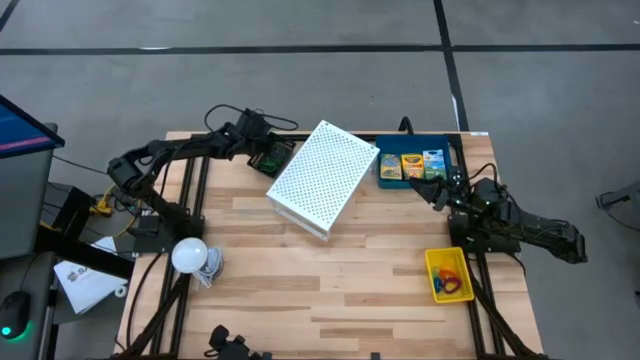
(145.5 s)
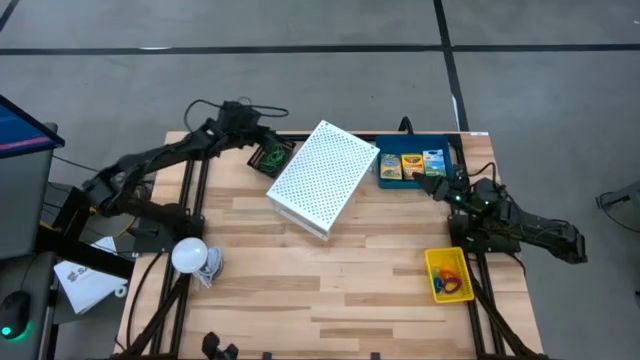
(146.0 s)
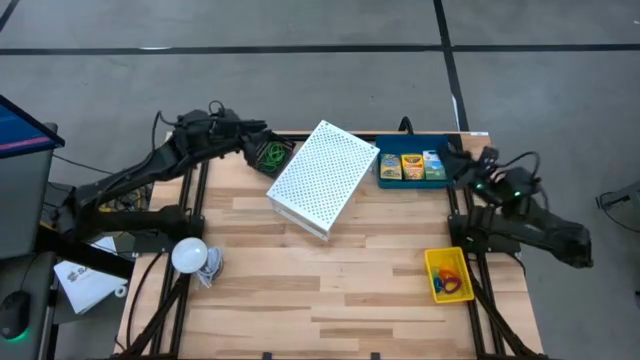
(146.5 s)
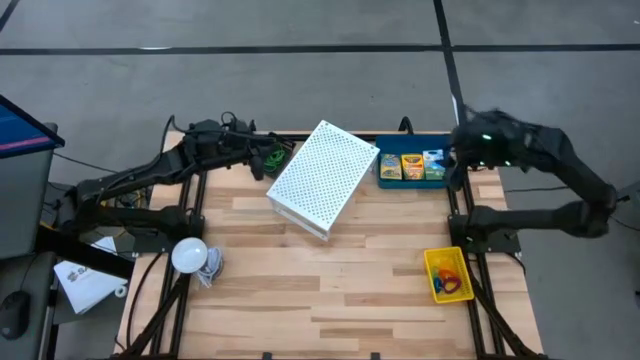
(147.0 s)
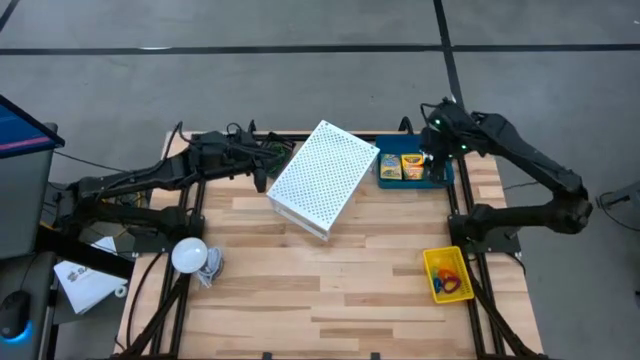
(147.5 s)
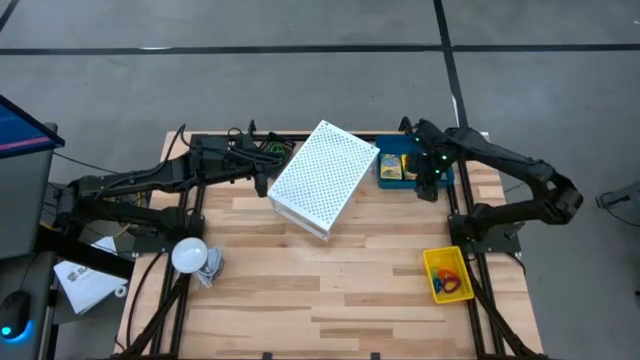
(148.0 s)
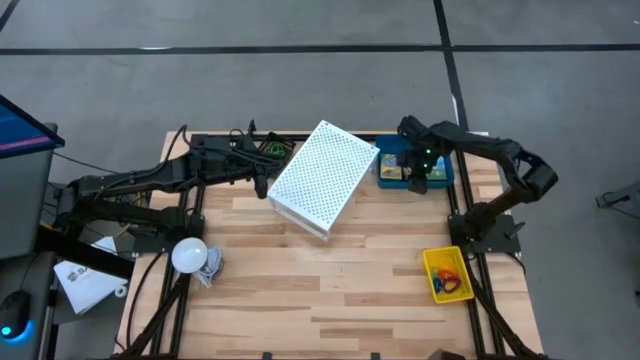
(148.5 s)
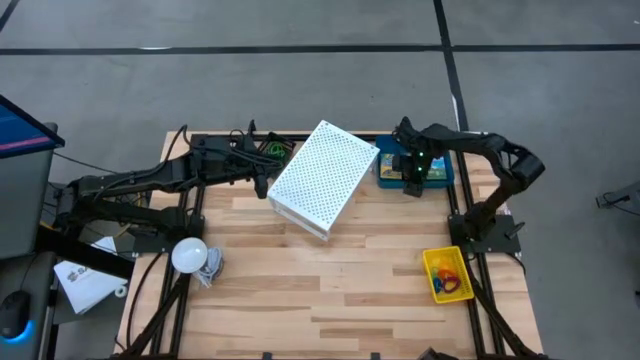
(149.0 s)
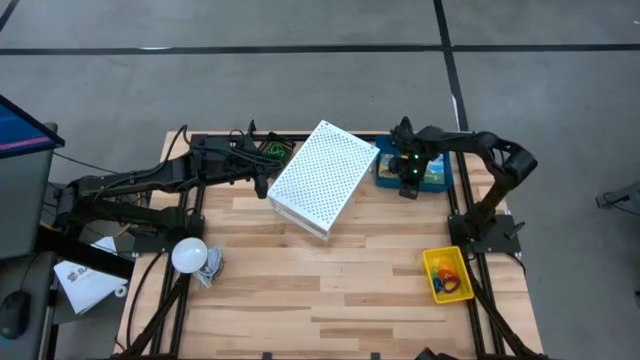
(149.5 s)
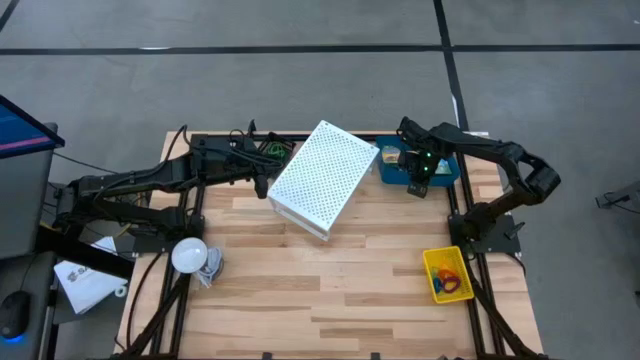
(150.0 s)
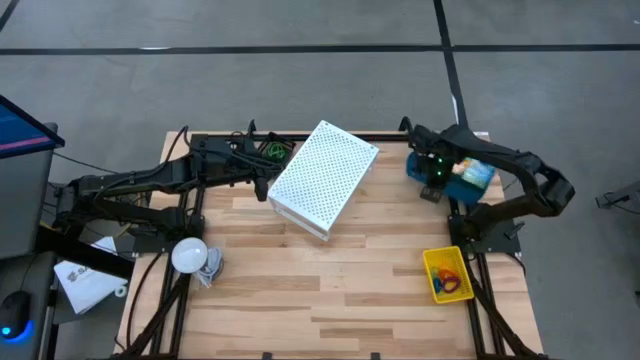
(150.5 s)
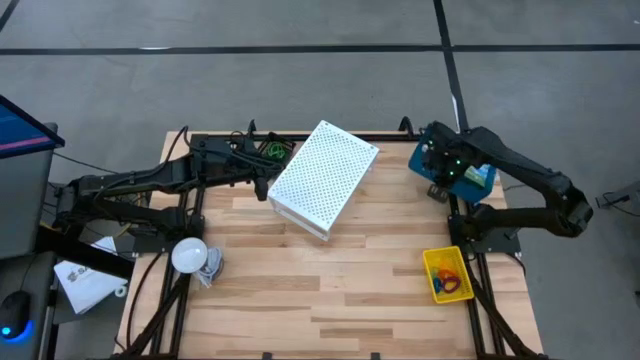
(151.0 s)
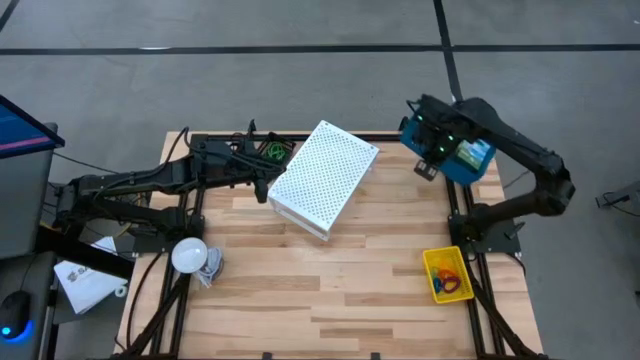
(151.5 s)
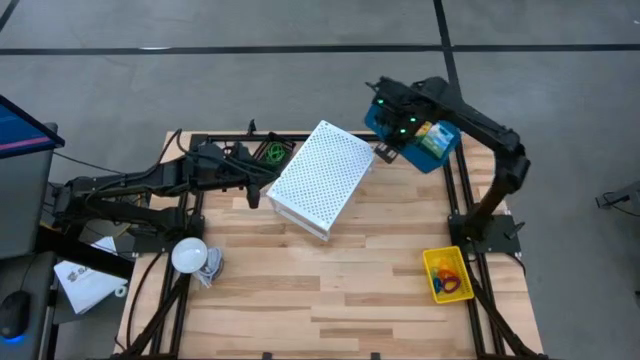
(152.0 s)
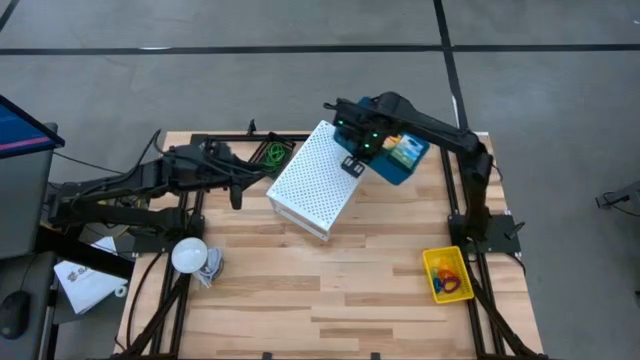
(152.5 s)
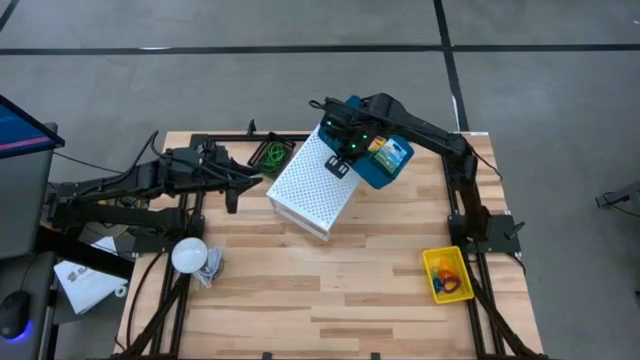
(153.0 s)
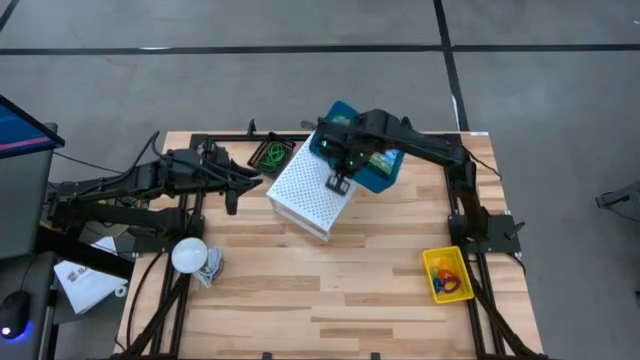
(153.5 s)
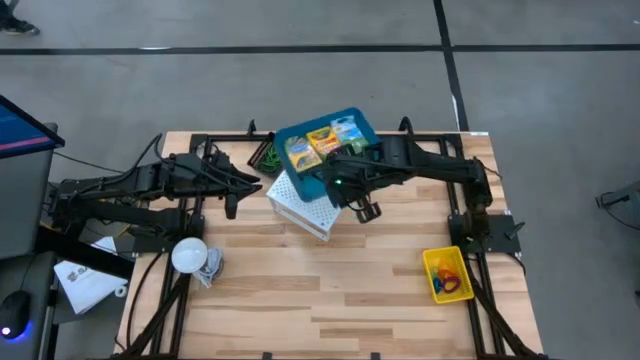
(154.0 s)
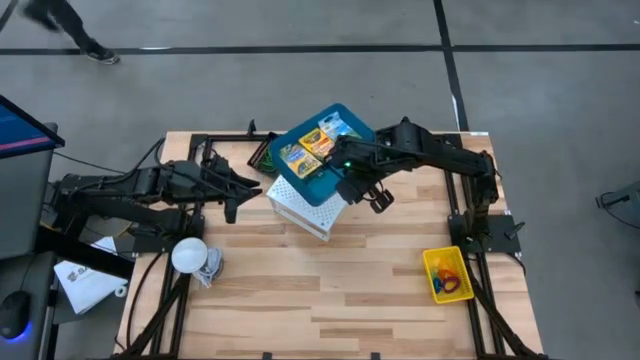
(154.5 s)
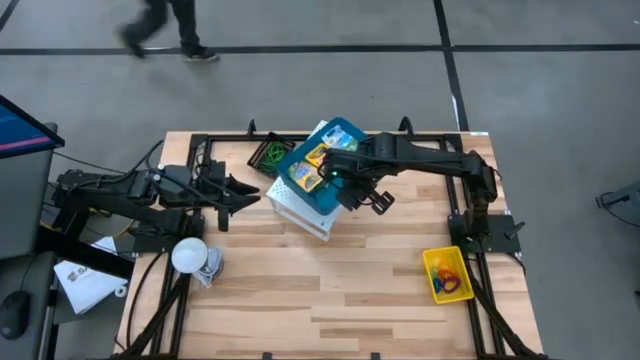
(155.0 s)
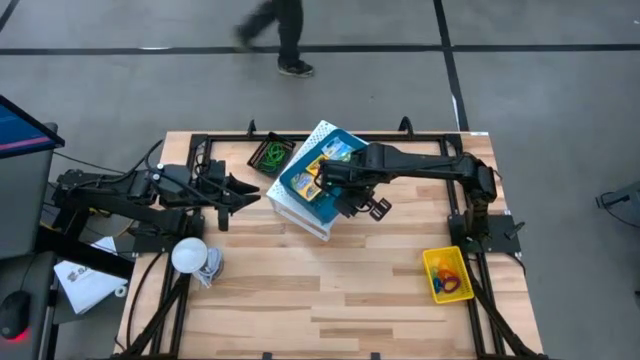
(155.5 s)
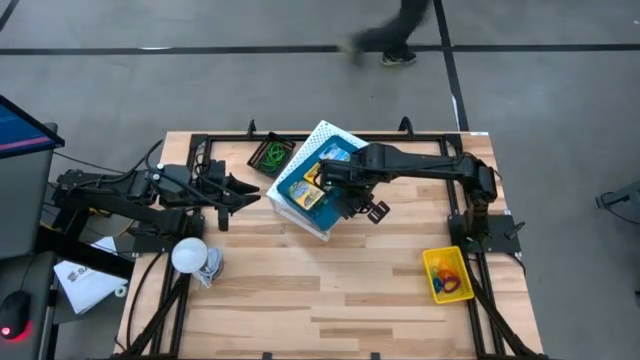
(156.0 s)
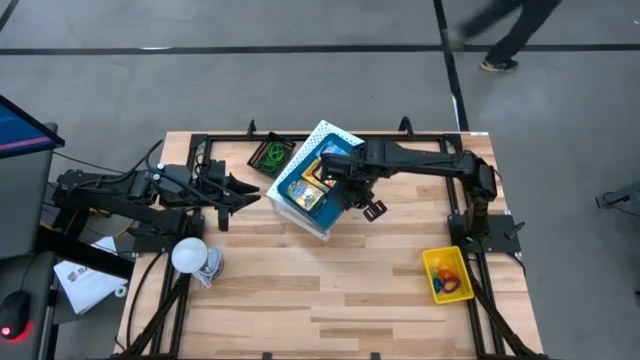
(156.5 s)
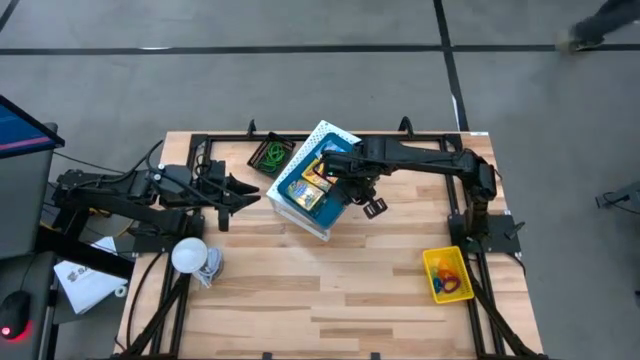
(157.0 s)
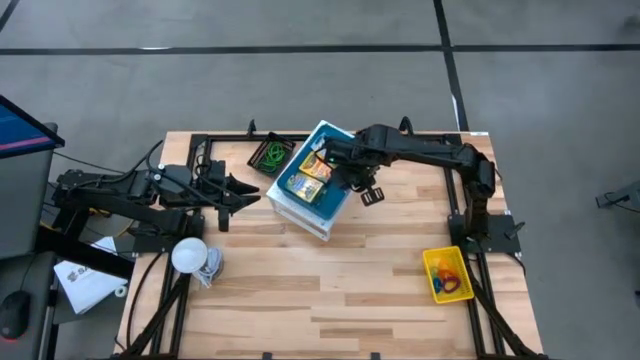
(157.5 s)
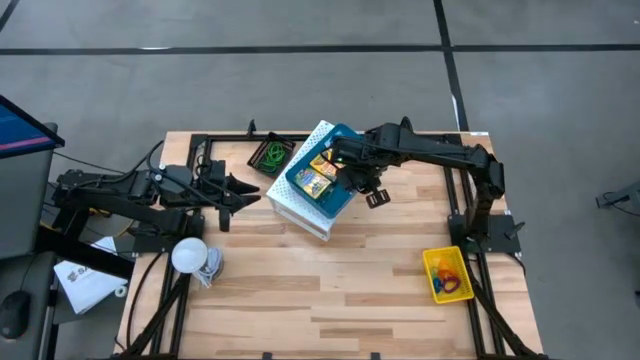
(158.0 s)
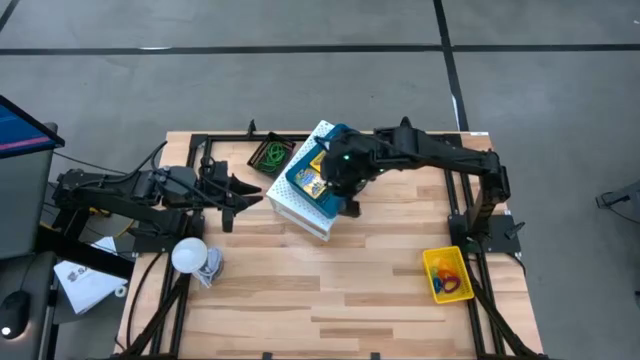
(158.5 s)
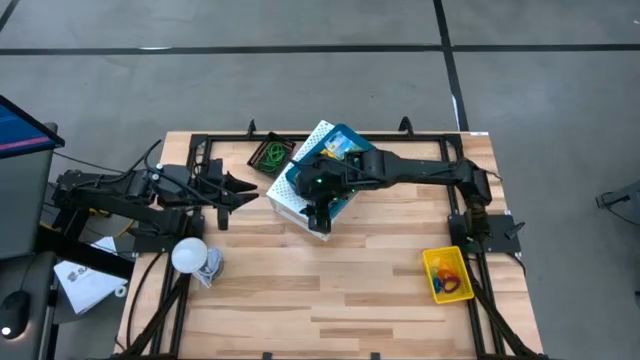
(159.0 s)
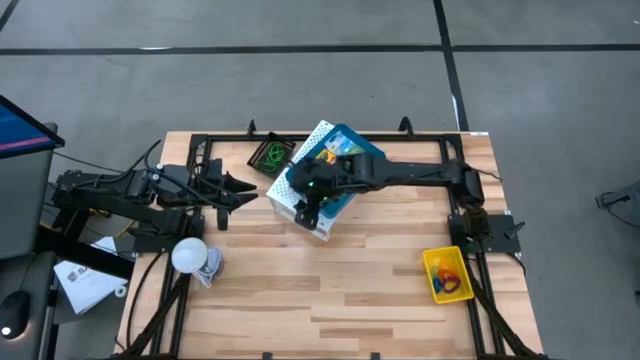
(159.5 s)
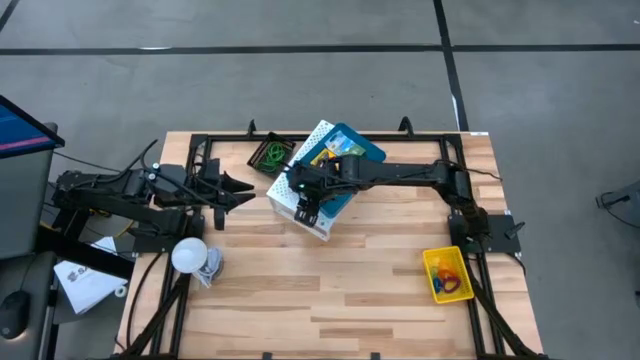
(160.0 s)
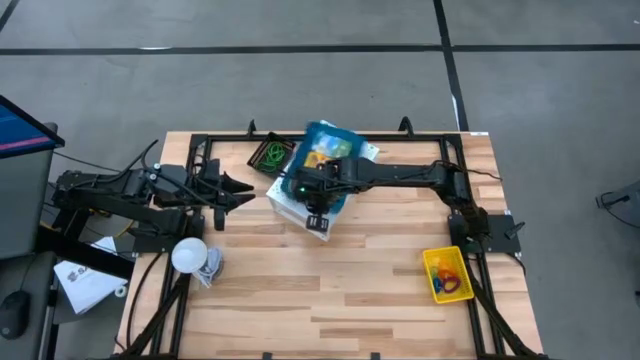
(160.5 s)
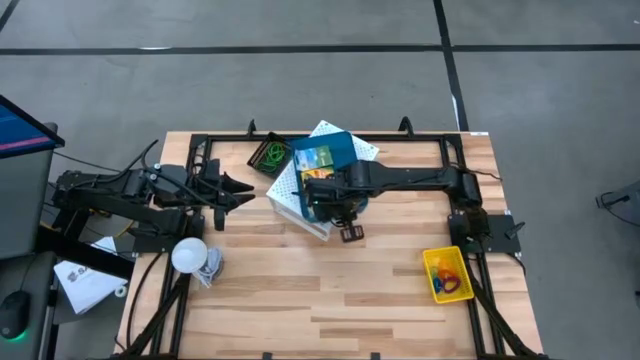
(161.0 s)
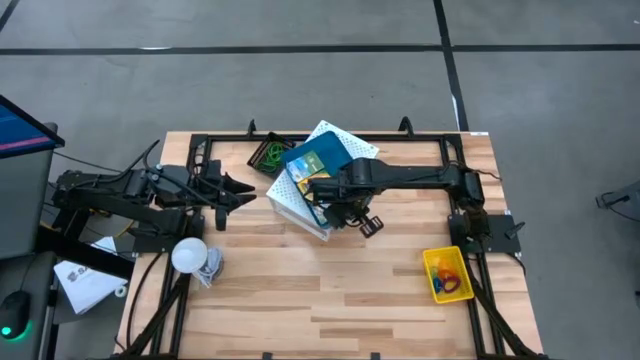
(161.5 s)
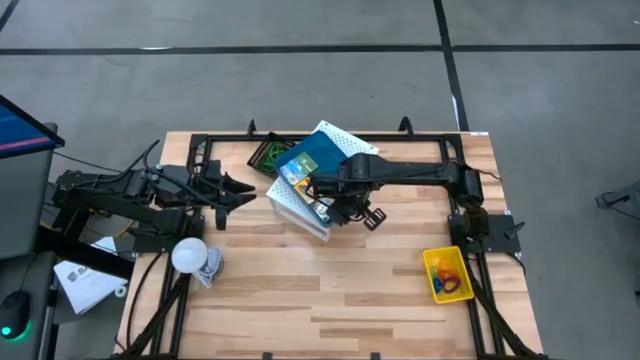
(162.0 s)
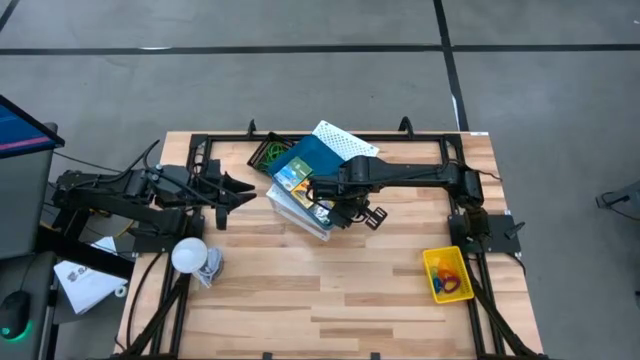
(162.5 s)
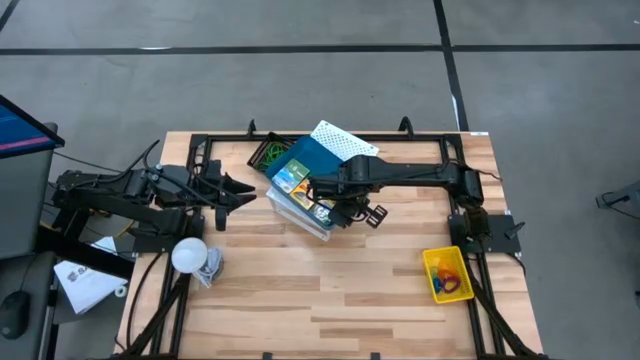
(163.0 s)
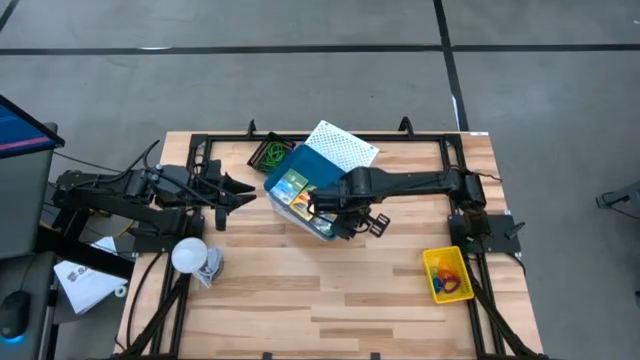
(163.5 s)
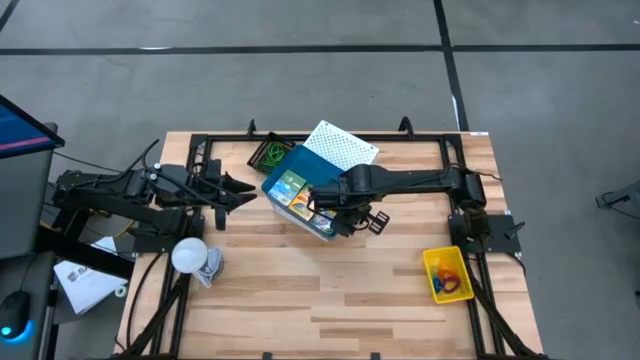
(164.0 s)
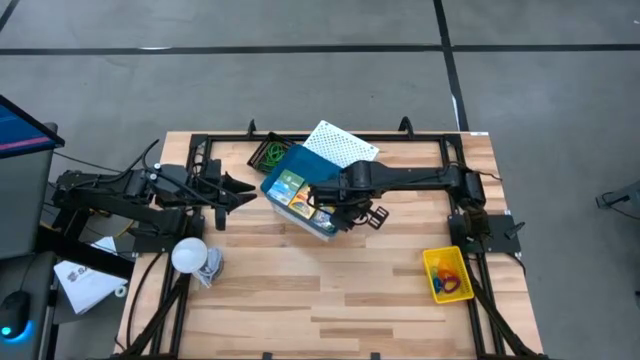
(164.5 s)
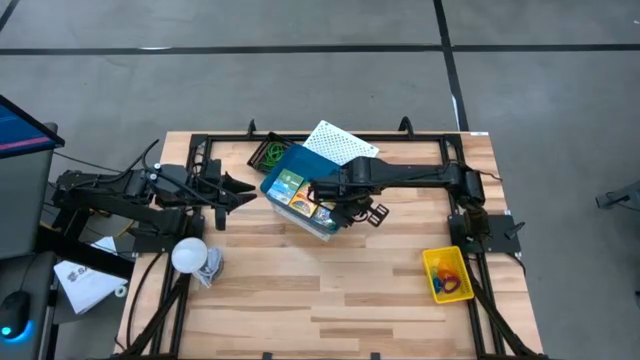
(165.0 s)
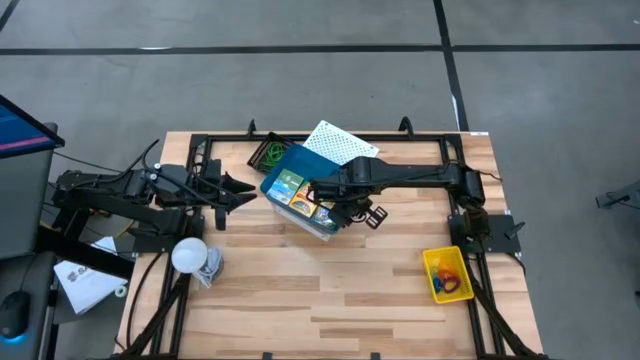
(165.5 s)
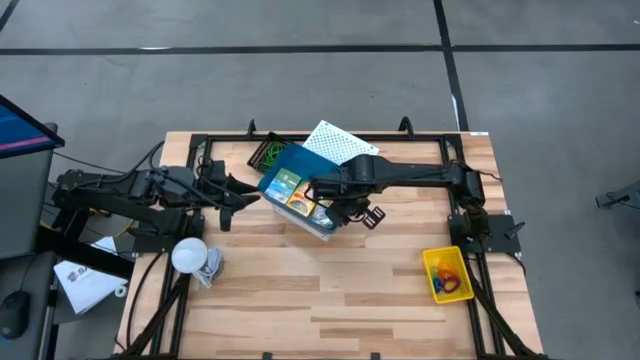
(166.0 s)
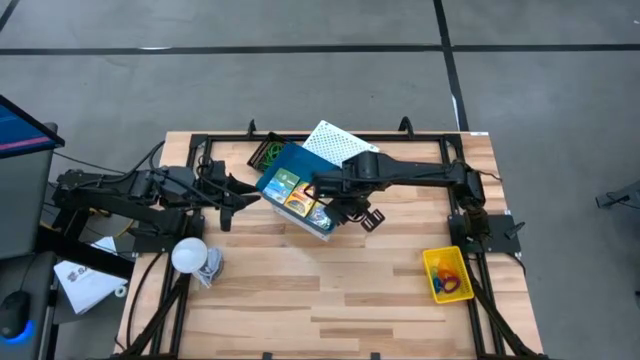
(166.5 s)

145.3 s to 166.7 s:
Task: Pick & Place Office Desk Supplies
Put the blue bin with the box of crayons on the shelf
